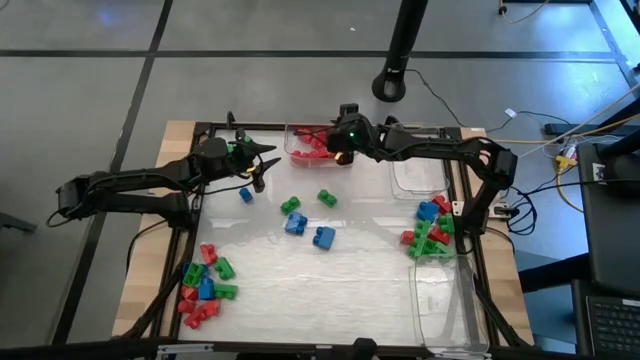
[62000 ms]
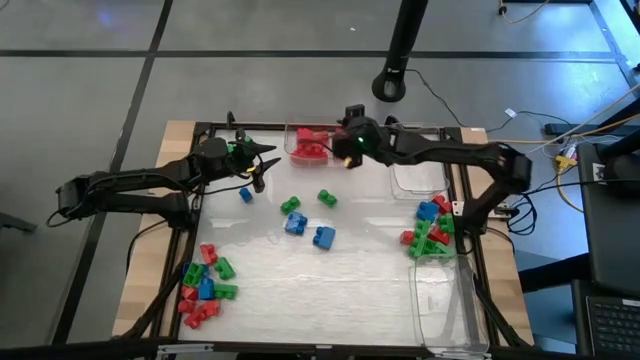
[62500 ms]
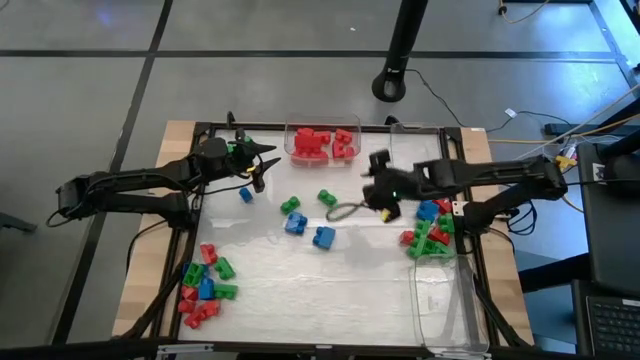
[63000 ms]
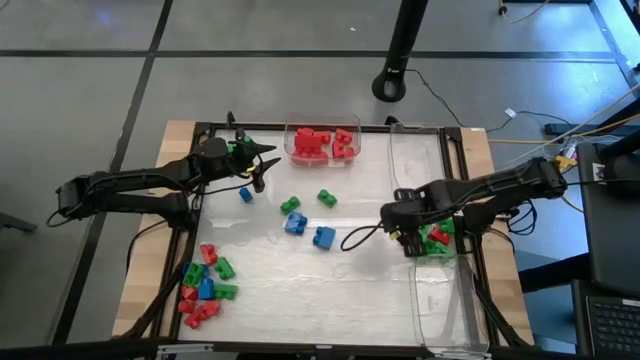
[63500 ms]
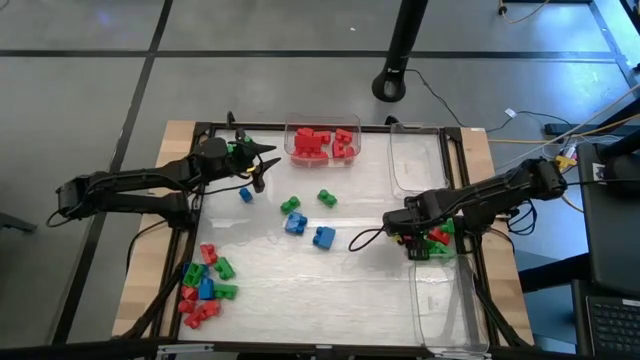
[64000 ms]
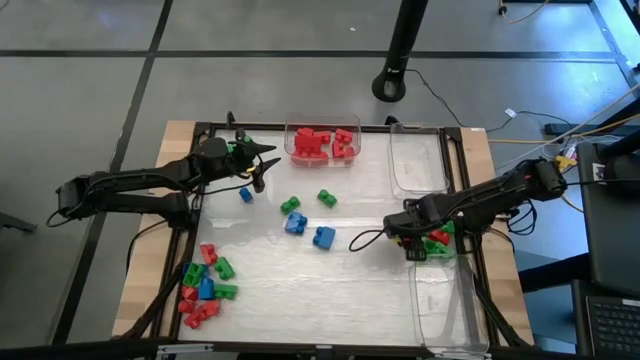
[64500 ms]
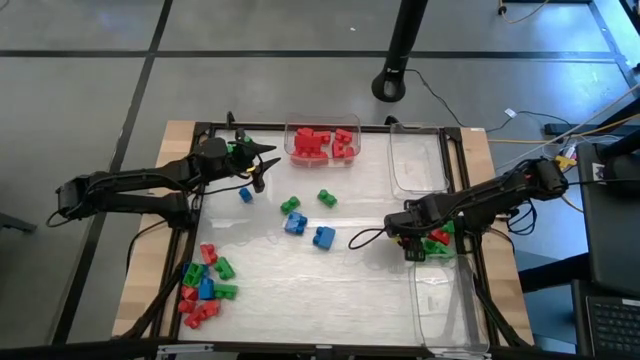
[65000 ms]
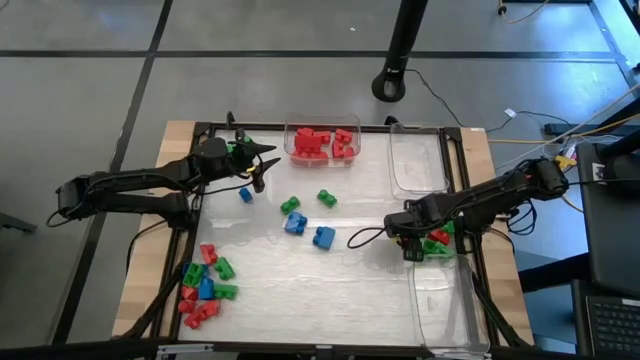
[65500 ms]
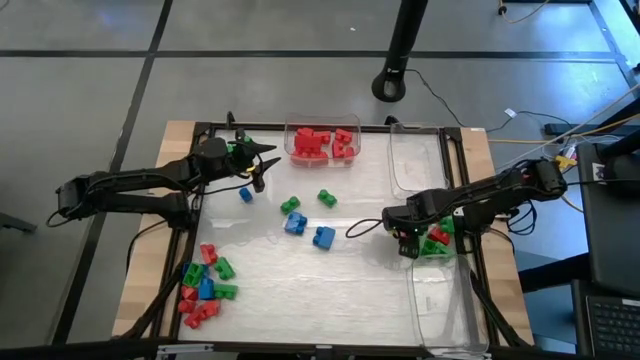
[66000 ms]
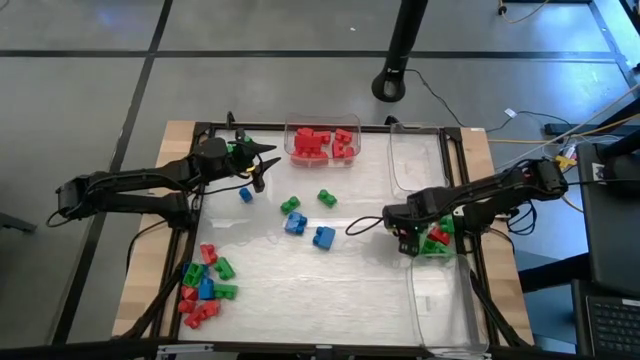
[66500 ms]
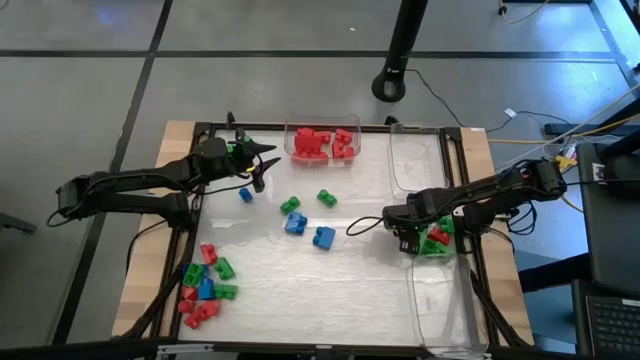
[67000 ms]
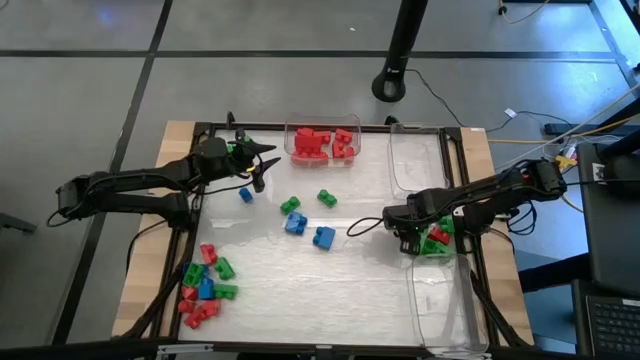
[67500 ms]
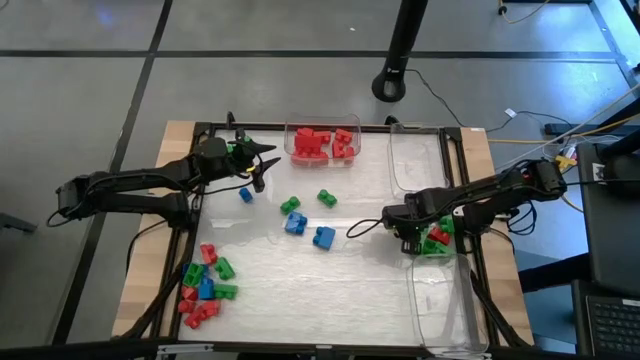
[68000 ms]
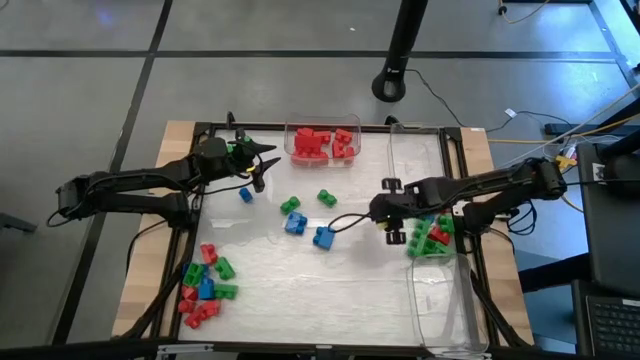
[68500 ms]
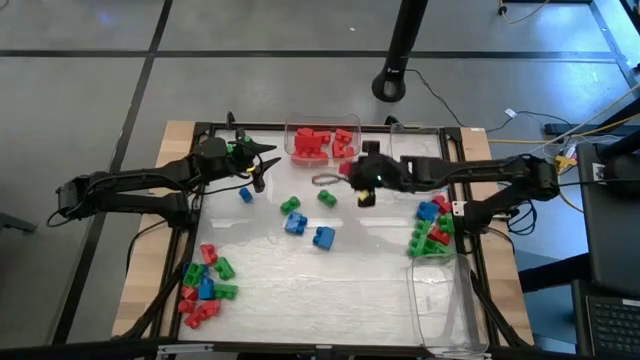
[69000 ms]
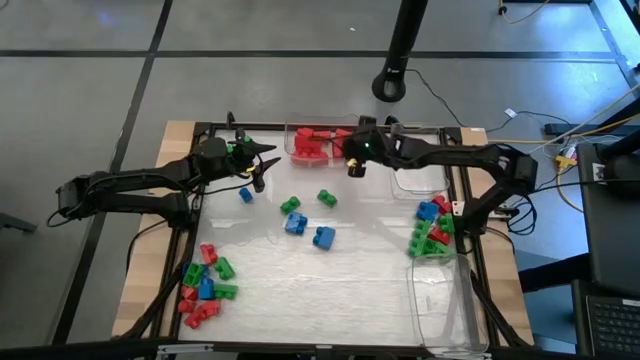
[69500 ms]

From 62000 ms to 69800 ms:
Task: Sort blocks
Put the red game piece into the top left transparent bin

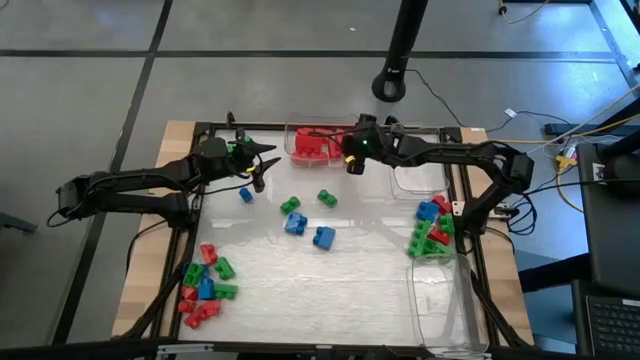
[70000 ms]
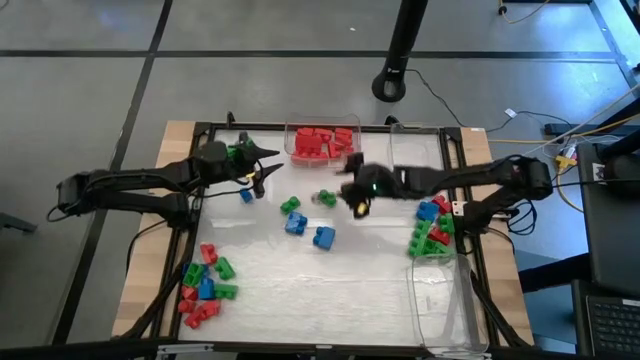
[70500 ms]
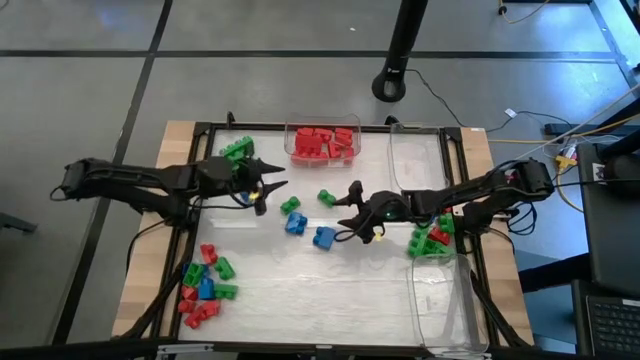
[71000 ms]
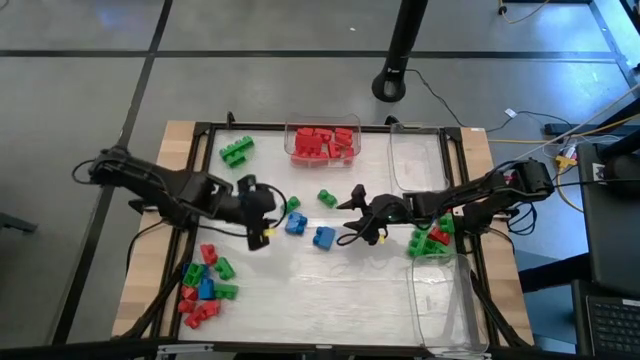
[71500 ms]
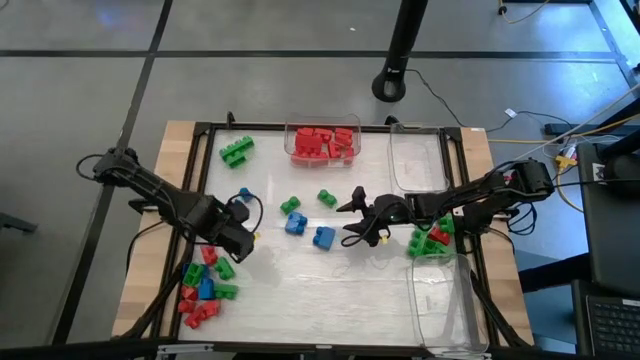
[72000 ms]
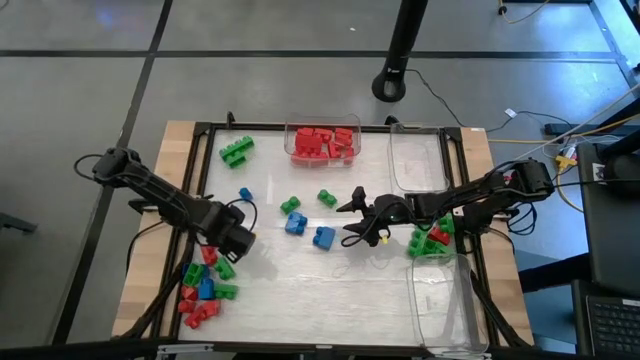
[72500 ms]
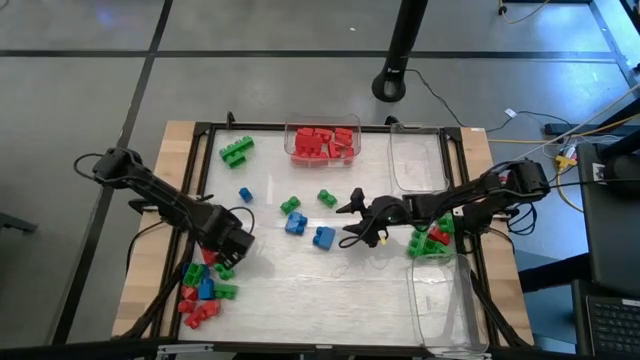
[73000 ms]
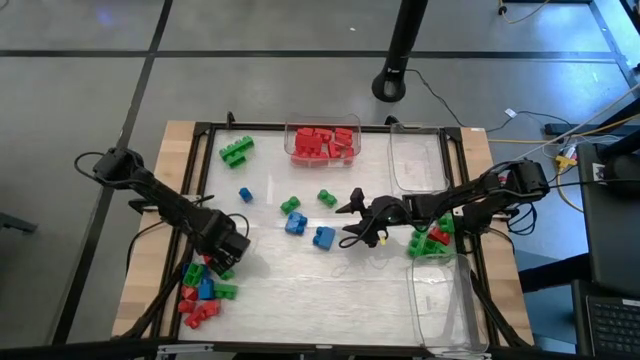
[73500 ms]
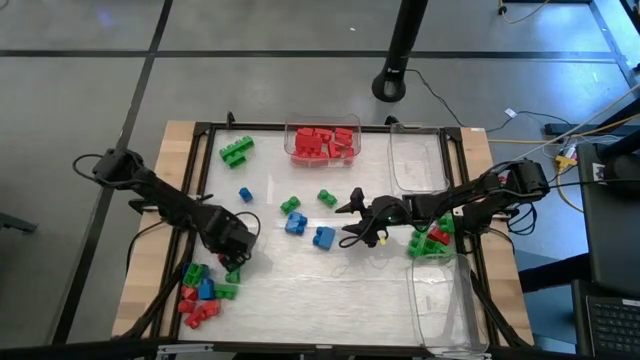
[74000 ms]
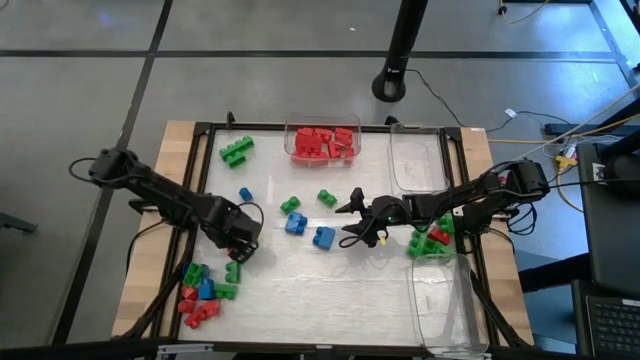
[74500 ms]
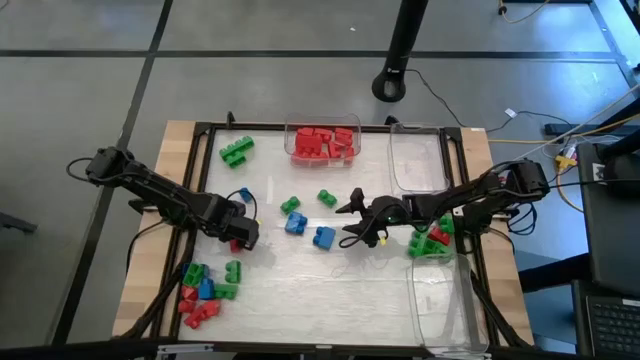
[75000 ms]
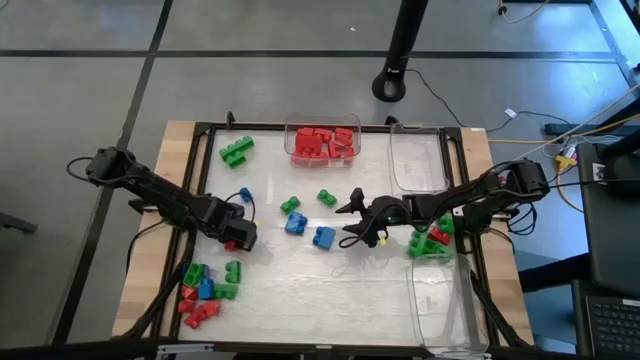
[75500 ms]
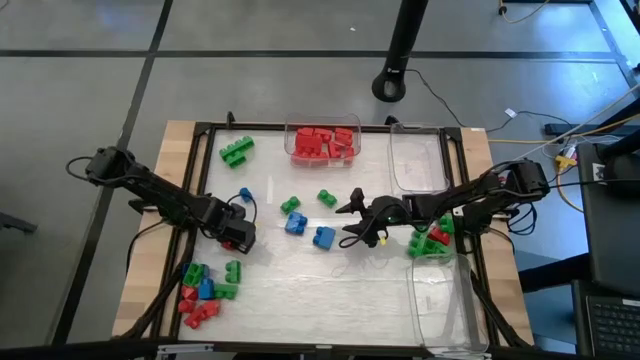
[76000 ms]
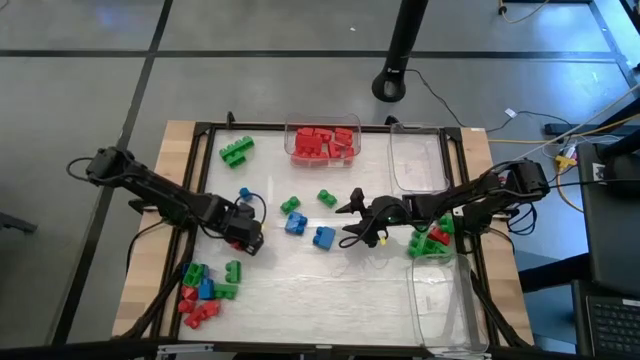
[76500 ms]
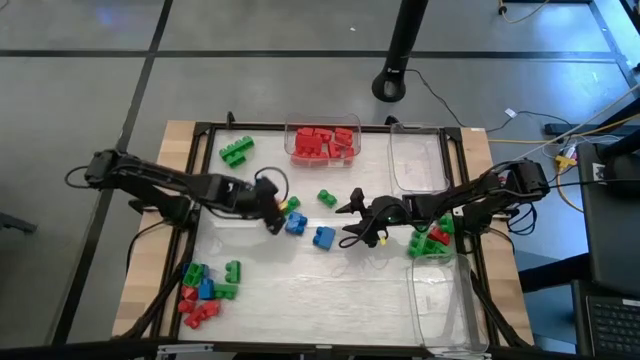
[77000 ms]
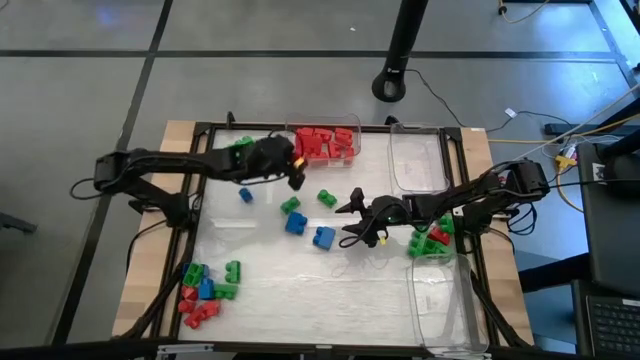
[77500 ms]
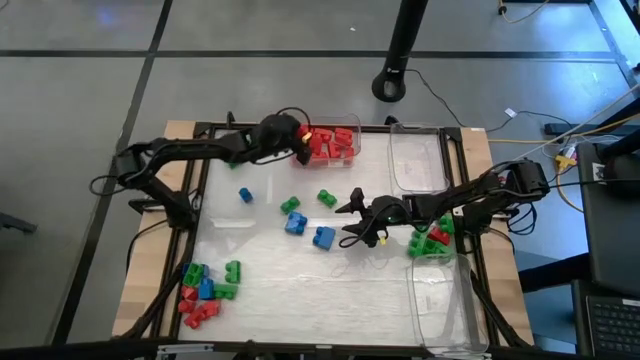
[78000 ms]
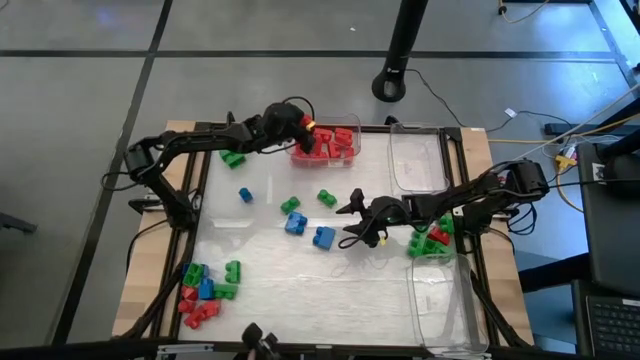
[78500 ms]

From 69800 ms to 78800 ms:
Put the red game piece into the top left transparent bin

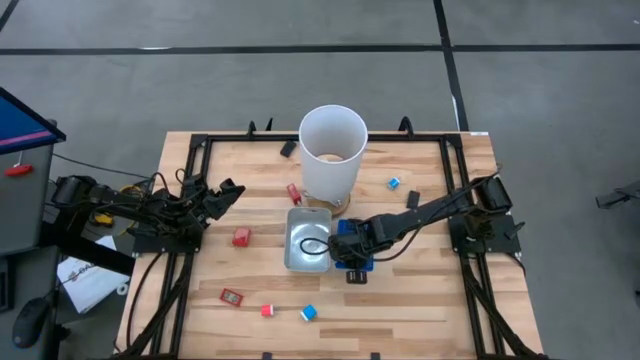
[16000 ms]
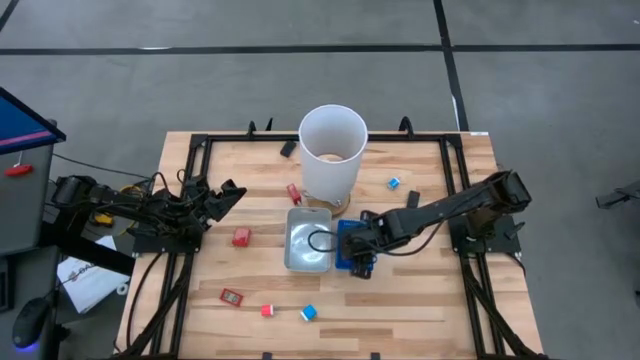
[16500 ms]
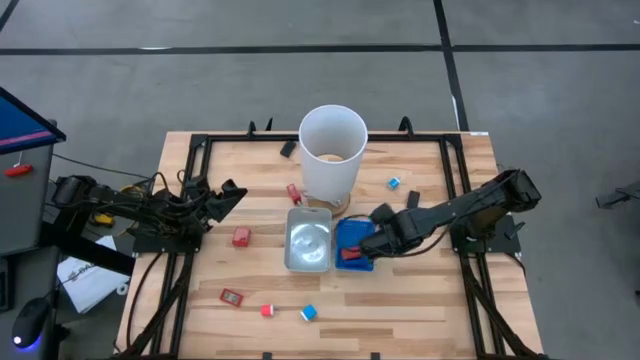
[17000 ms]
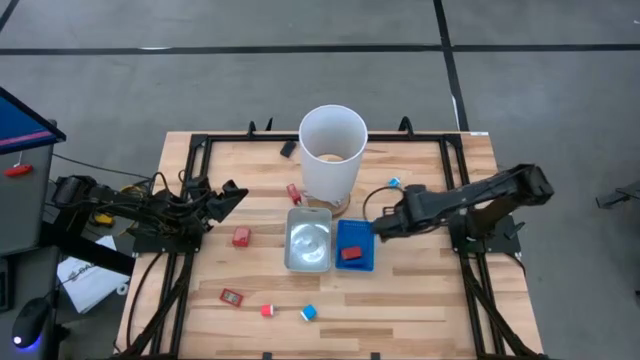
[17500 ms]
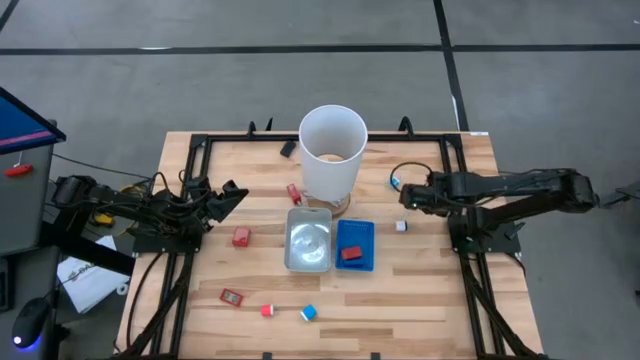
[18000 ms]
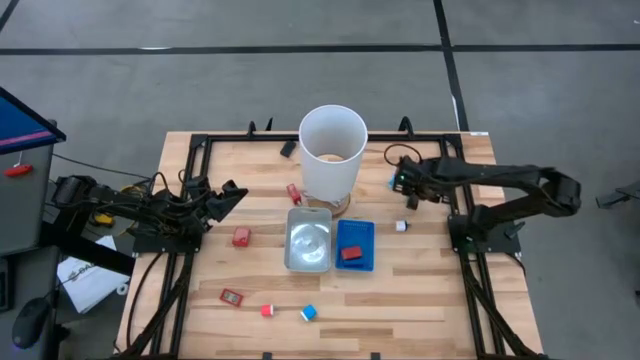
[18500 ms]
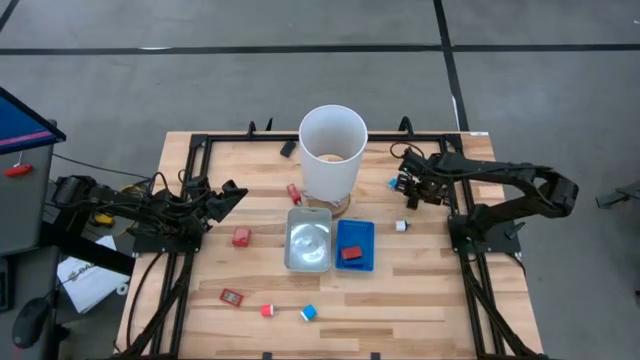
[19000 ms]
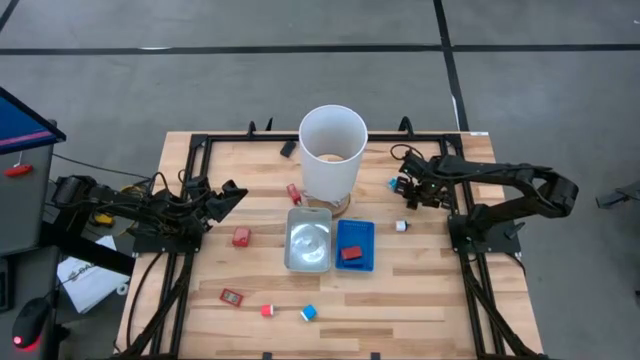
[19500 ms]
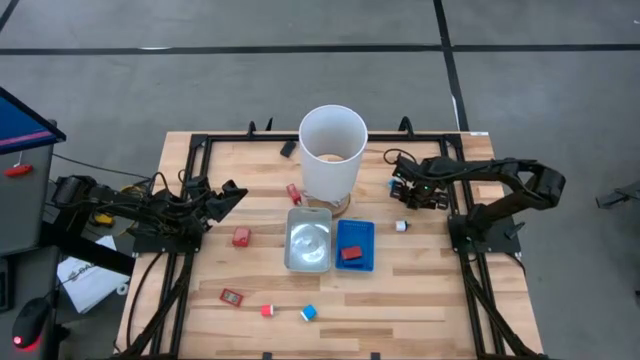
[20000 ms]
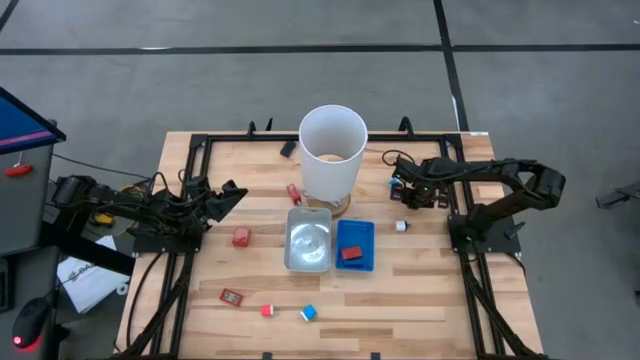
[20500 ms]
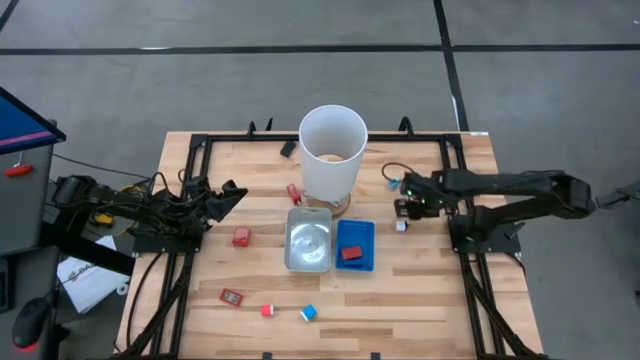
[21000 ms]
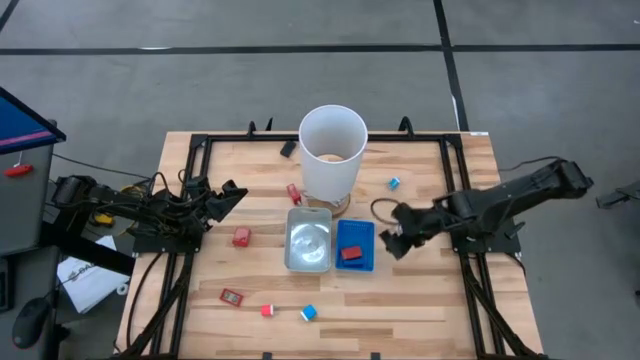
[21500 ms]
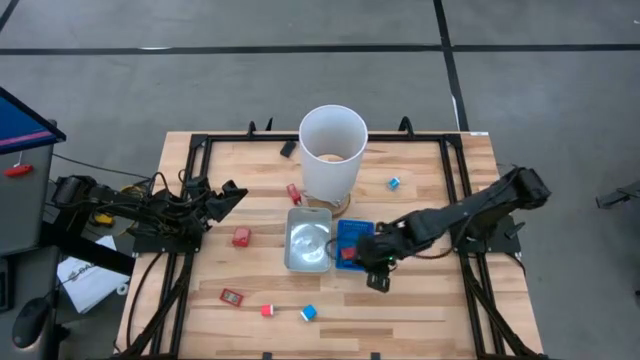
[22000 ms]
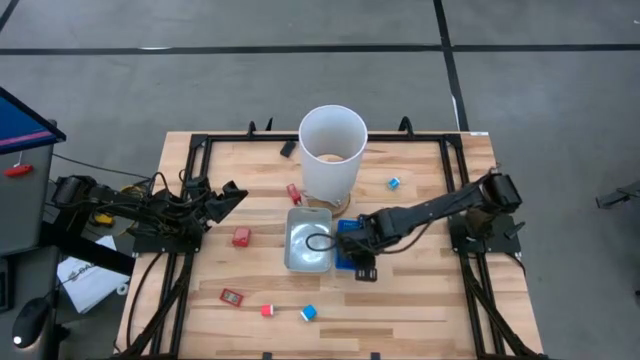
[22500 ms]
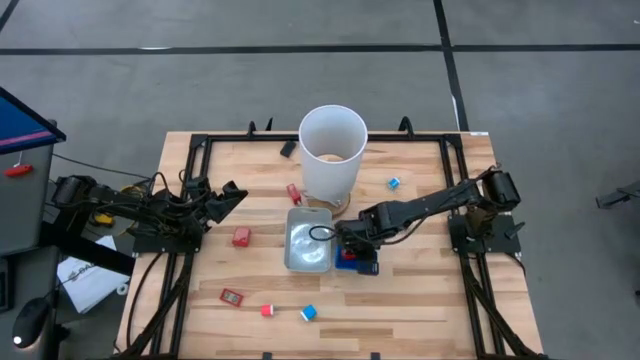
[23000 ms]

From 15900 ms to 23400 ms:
Task: Pick & Place Office items
Put the bottom black digital clock into the blue bin
